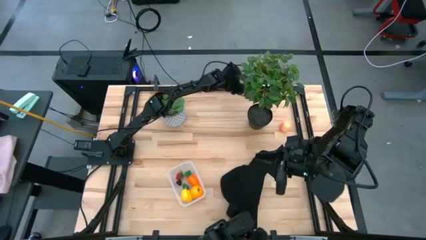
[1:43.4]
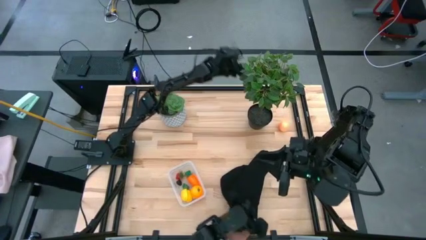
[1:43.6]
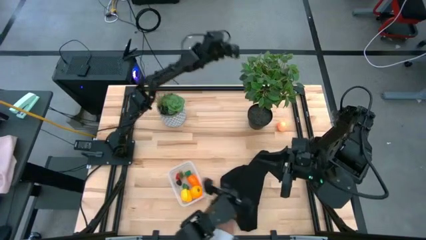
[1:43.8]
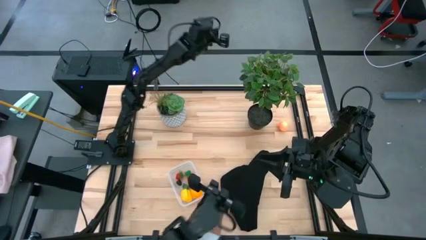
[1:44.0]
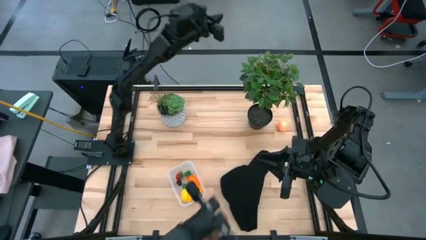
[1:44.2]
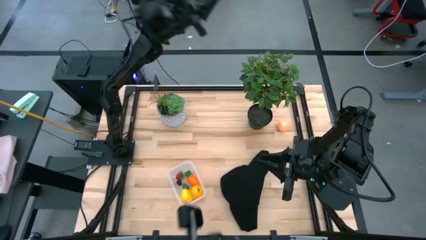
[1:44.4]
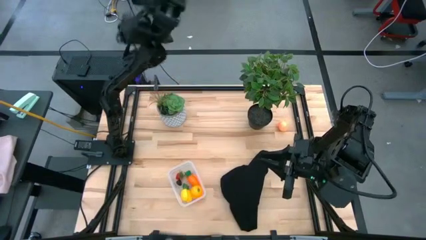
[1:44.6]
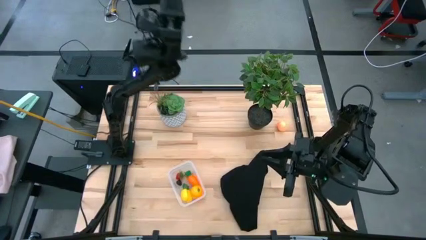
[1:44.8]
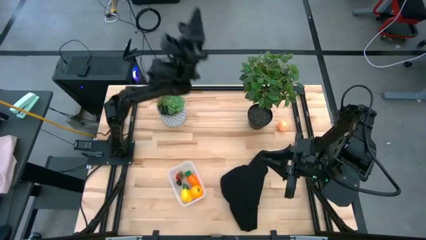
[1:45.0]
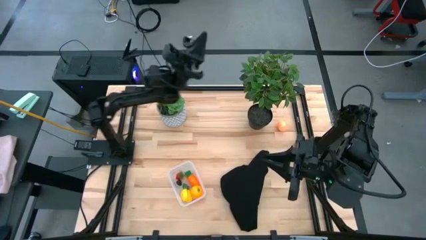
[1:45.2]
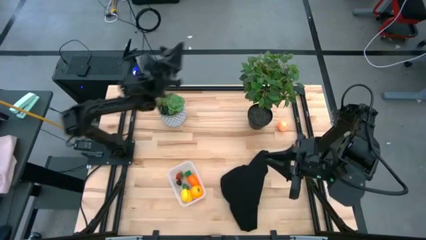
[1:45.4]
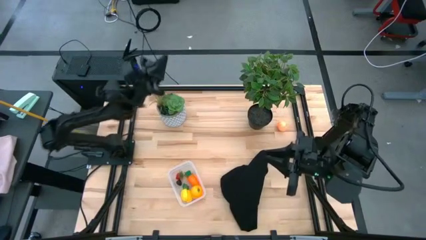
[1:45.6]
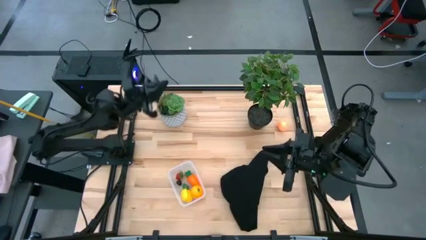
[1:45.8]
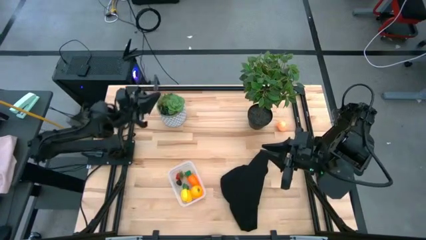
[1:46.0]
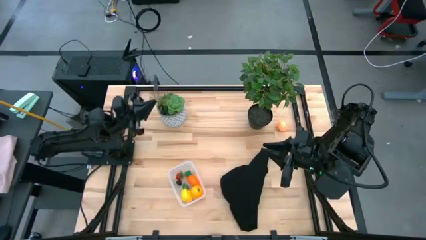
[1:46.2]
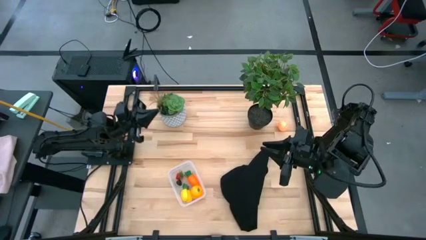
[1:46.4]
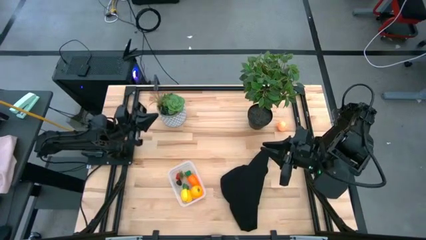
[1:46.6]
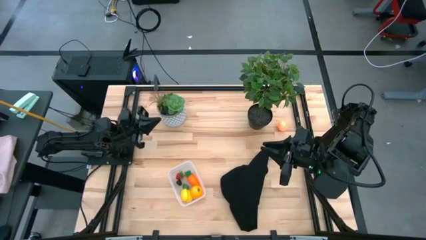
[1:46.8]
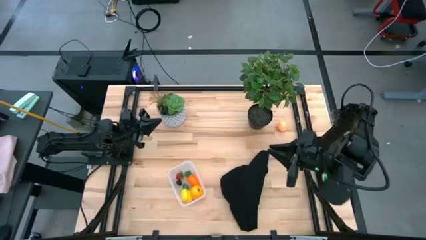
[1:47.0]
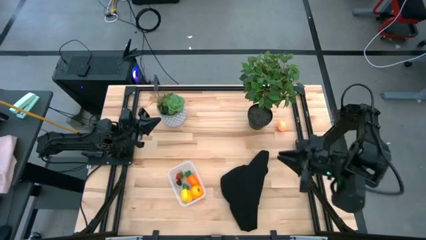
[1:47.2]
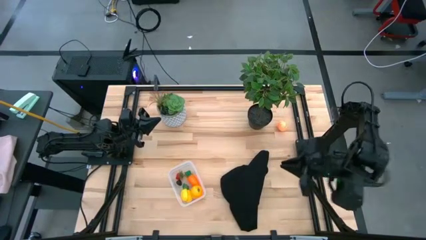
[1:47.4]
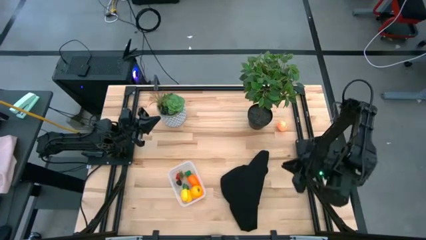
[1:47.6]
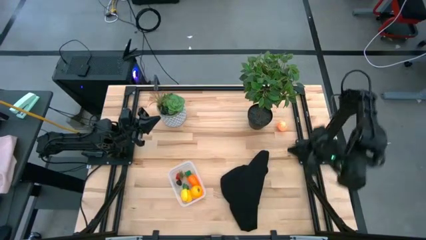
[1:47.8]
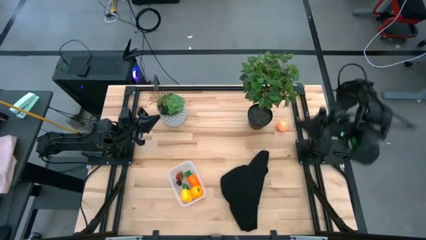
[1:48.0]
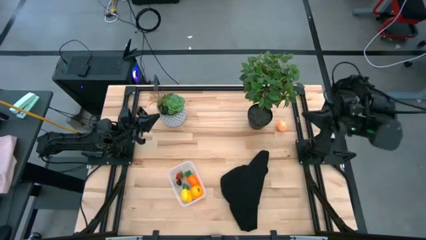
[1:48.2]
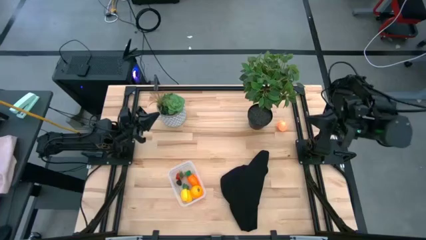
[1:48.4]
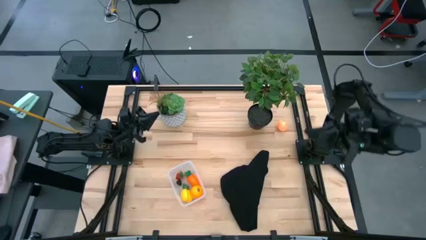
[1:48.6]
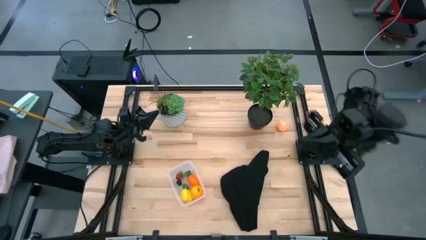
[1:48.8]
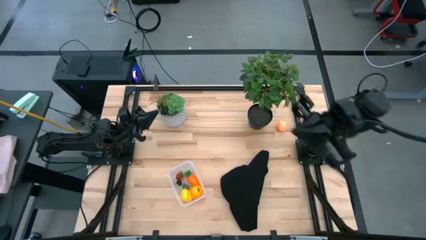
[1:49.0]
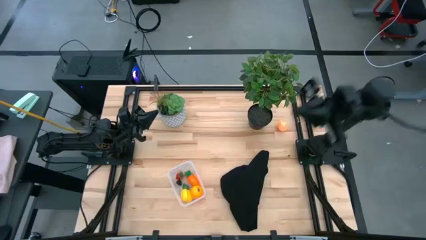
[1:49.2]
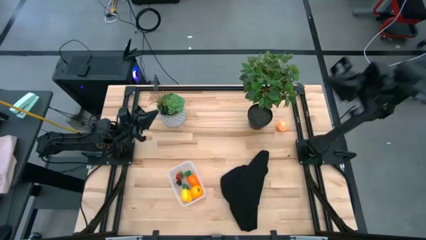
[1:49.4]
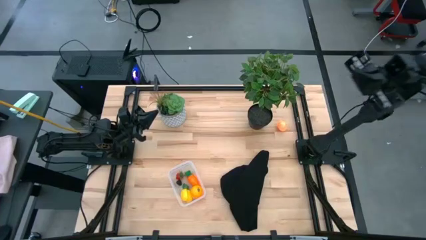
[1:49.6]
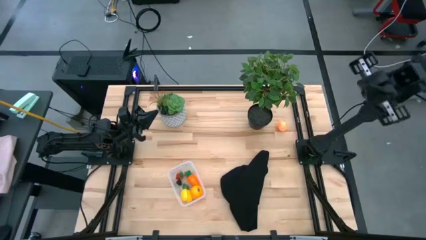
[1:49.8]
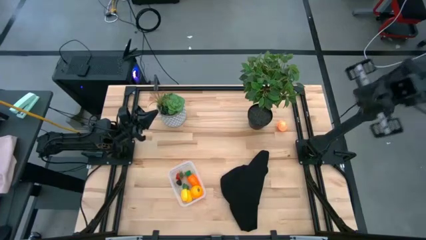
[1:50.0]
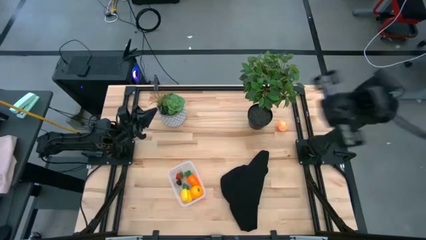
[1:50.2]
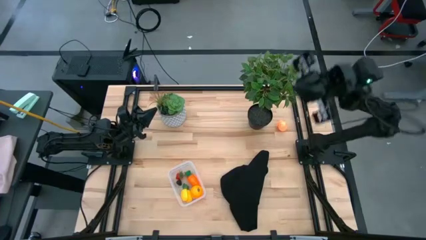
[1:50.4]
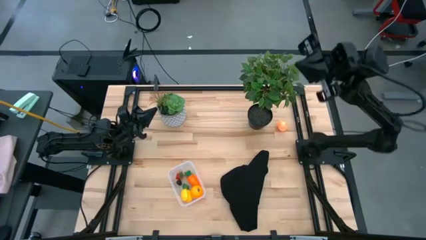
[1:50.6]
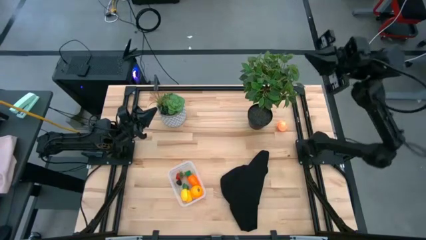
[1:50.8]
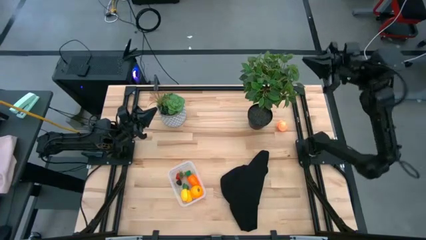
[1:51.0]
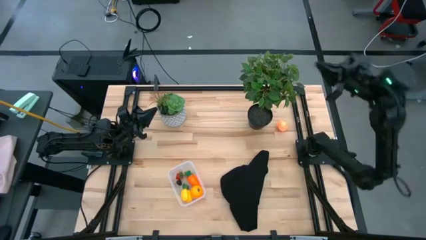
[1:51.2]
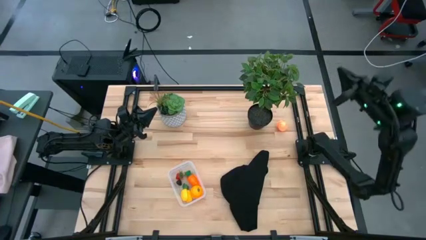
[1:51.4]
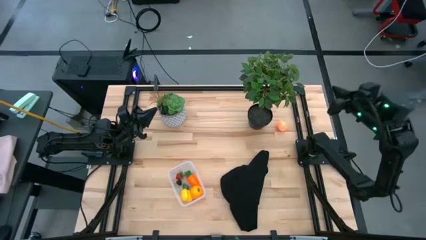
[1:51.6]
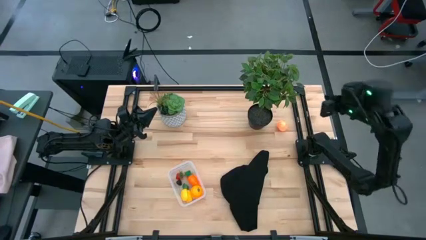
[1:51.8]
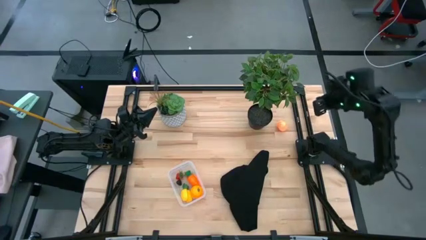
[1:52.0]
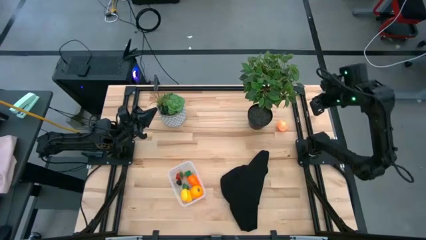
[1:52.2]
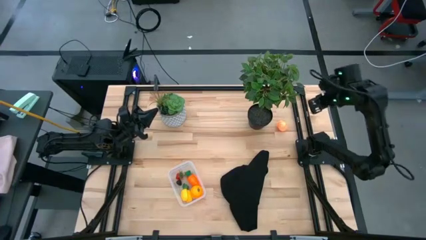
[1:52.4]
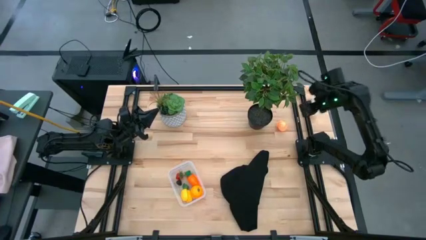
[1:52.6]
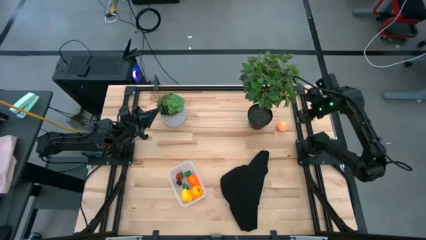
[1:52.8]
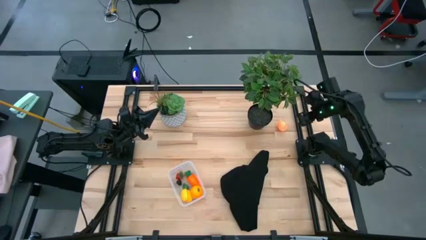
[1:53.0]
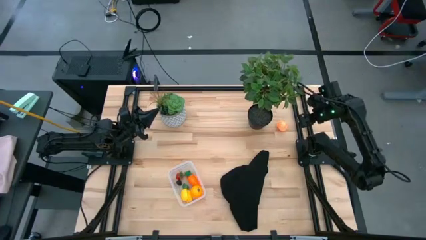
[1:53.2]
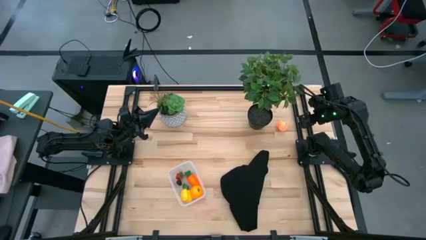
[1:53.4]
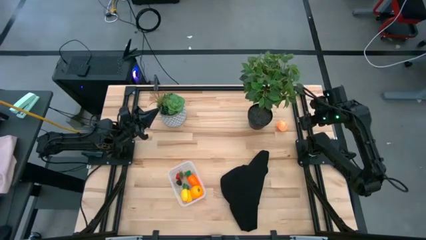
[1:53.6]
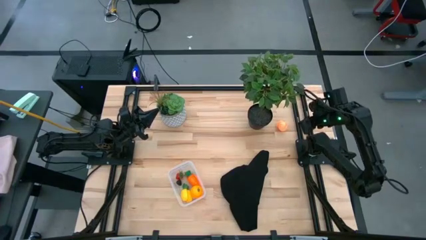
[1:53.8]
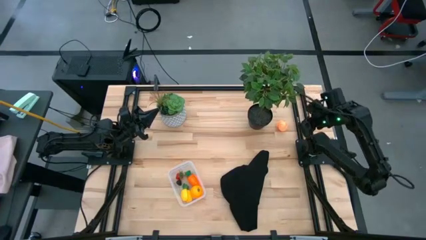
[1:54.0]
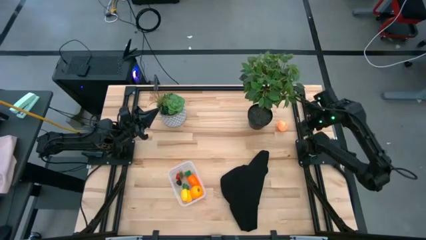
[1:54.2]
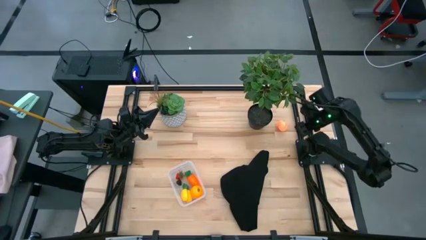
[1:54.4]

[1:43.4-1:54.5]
Task: Pick and placing Produce into tupperware
Put the peach into the transparent bin

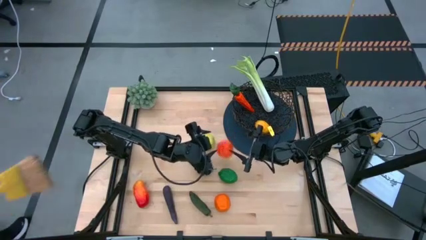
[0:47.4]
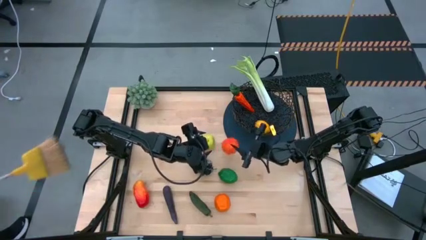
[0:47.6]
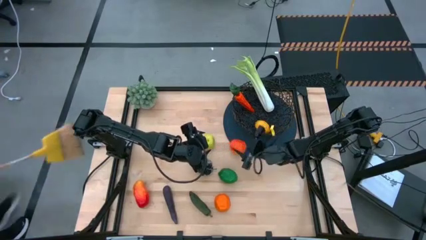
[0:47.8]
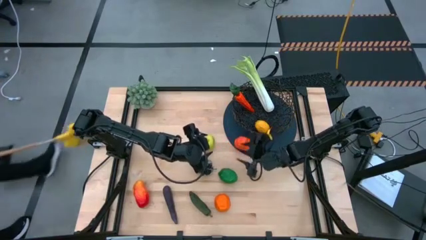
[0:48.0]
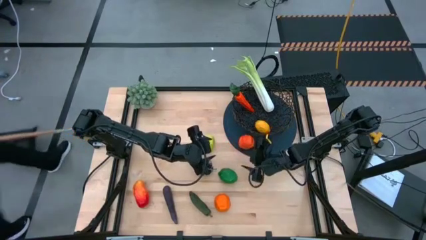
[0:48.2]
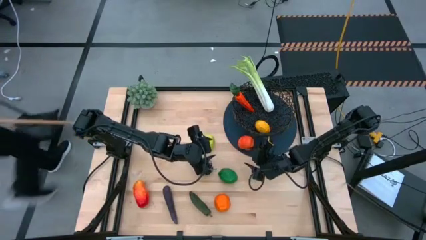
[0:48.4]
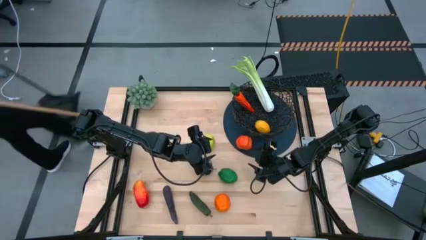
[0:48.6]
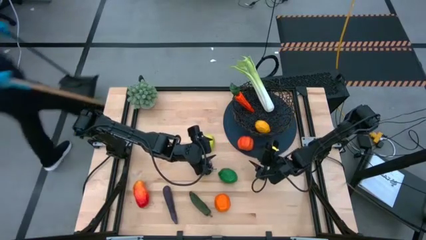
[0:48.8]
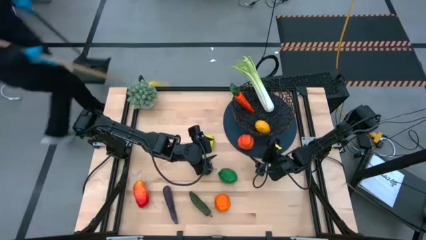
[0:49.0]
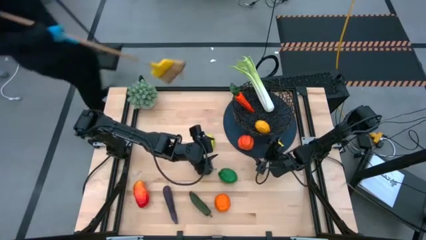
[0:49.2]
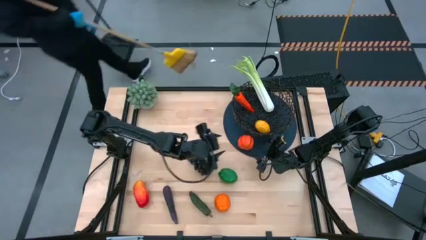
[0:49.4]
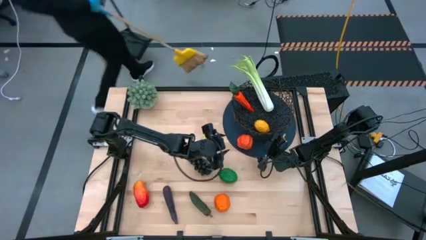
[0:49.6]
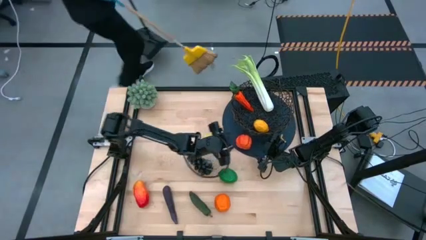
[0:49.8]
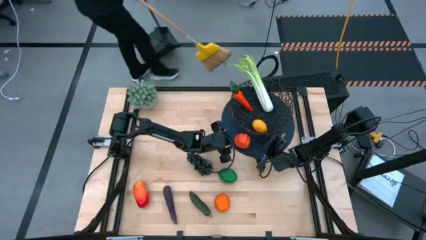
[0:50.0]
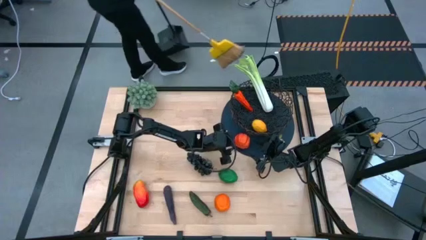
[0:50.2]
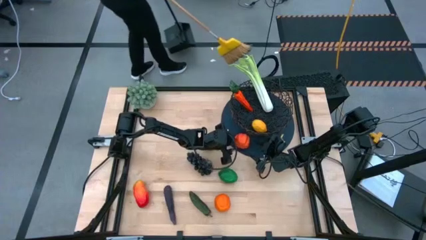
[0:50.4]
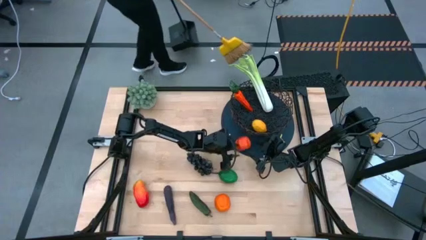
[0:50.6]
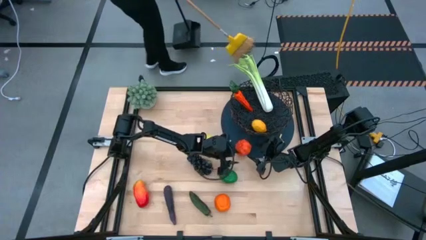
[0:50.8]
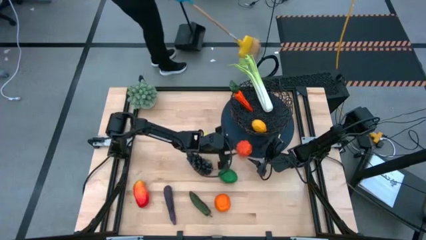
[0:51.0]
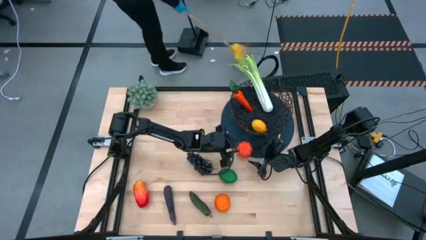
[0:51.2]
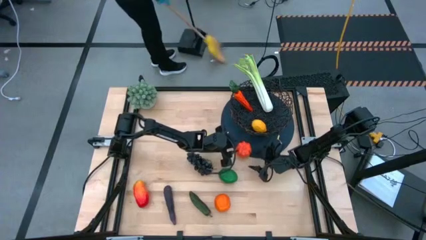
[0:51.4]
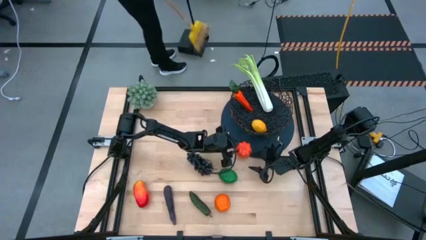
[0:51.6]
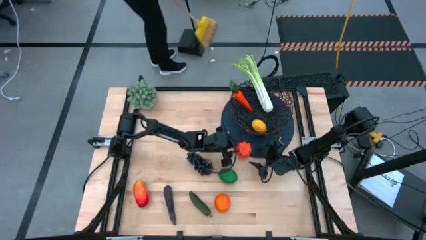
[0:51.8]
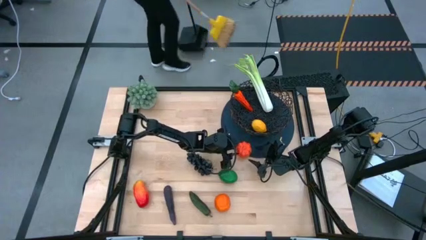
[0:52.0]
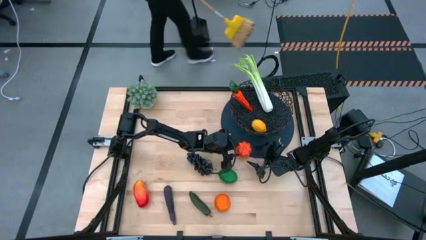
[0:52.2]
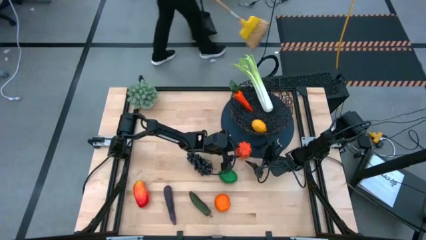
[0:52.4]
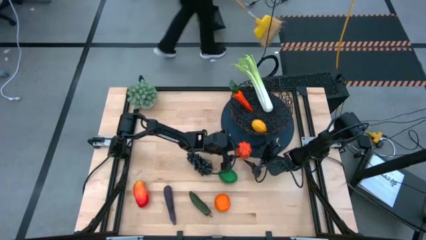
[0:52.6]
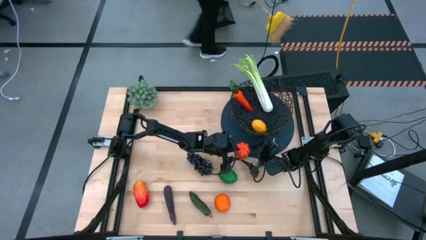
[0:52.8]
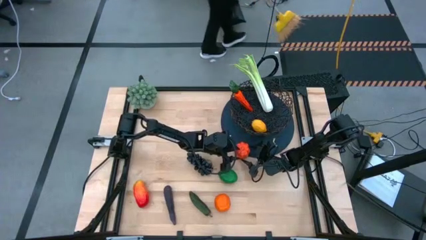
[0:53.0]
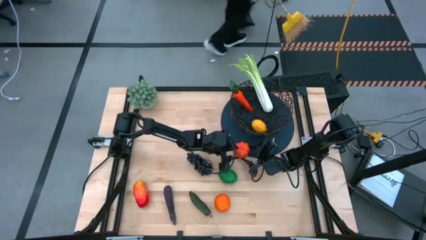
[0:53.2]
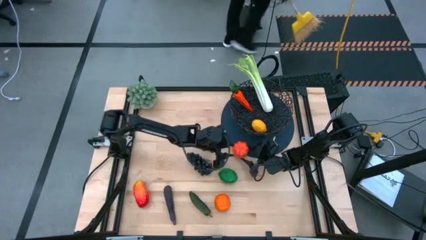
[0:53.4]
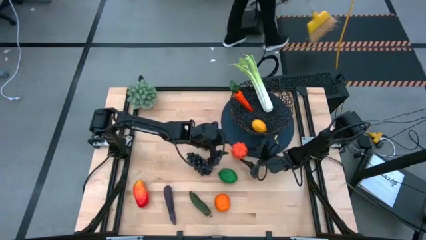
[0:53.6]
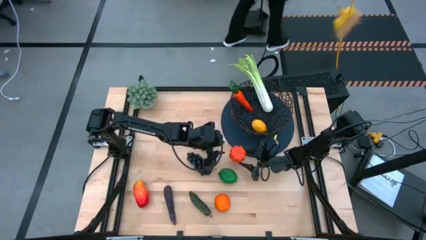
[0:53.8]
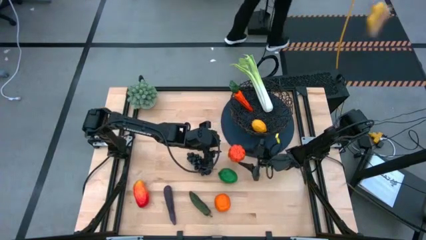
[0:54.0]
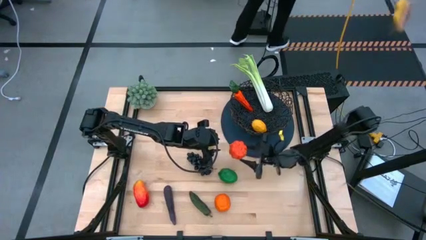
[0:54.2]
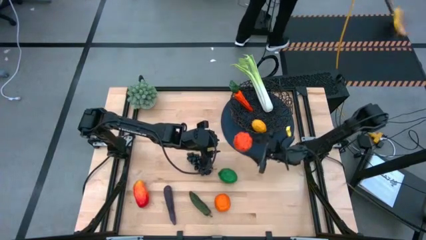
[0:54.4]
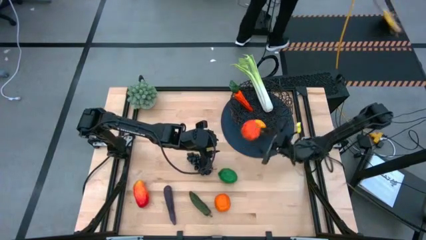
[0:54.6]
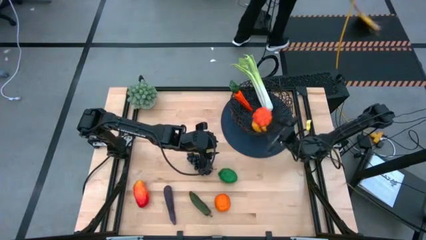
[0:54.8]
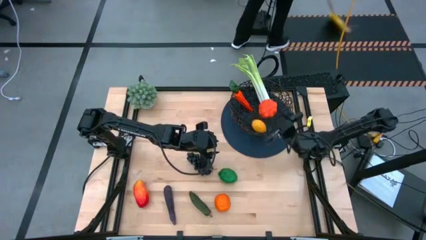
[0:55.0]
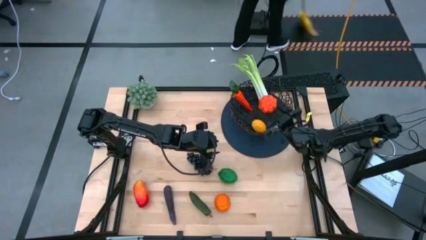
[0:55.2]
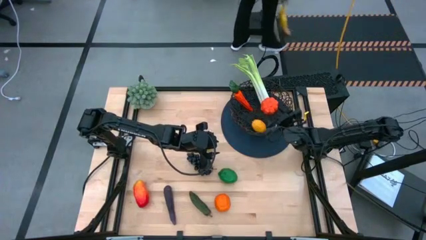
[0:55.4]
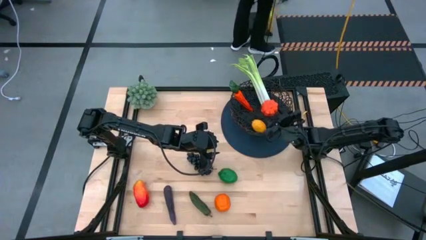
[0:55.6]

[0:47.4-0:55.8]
Task: Build produce basket
Put the orange pumpkin into the black wire basket
